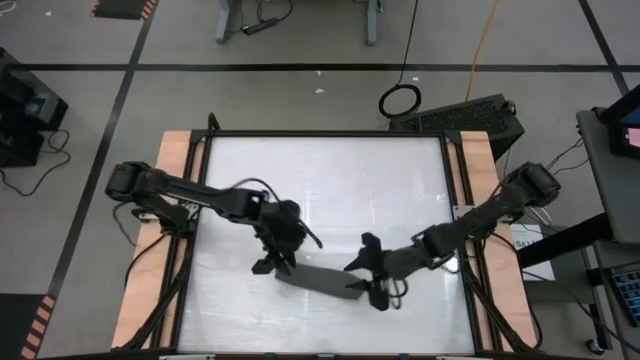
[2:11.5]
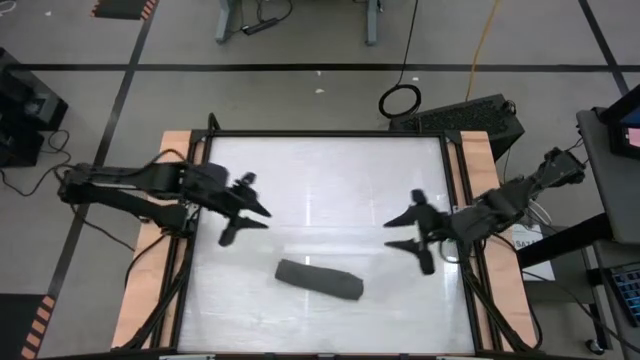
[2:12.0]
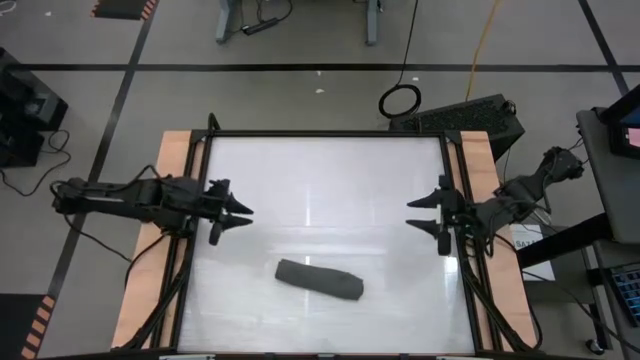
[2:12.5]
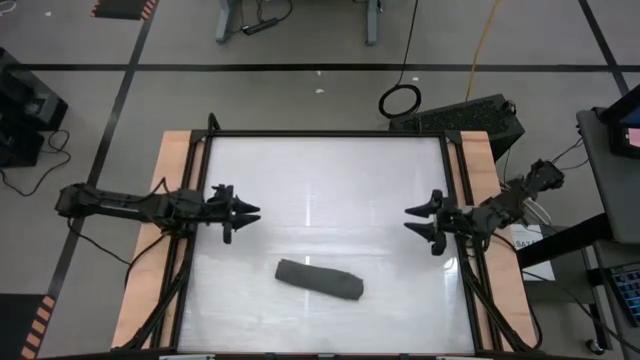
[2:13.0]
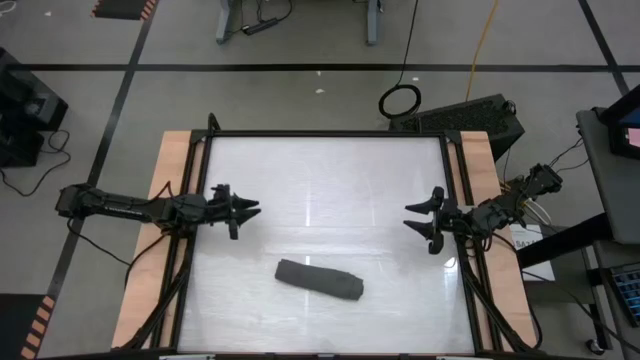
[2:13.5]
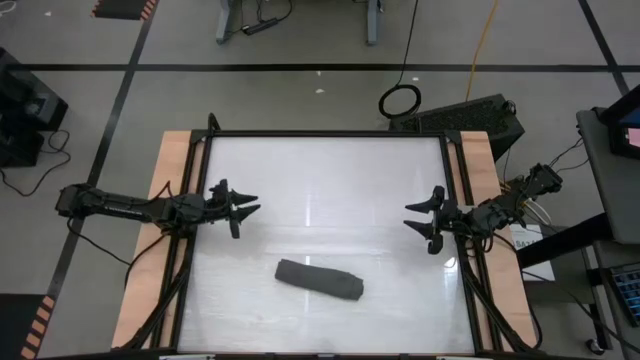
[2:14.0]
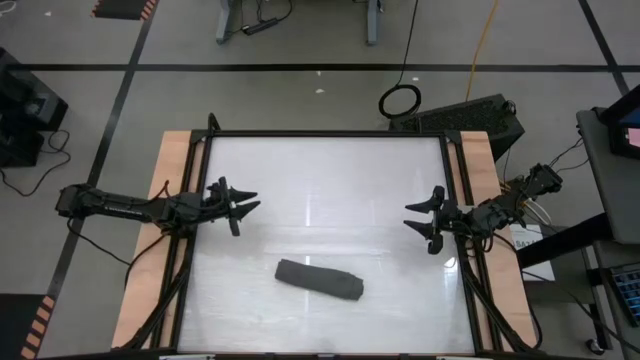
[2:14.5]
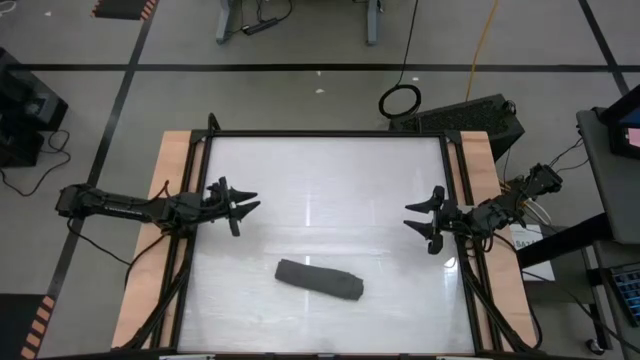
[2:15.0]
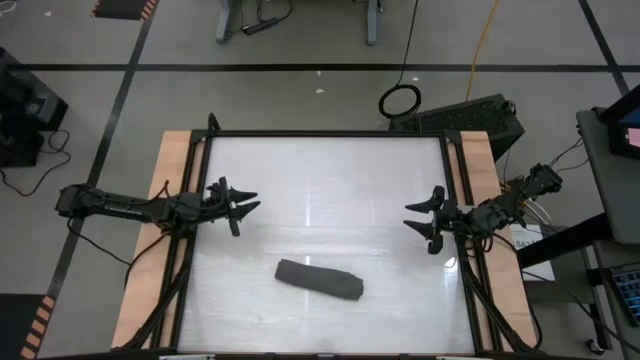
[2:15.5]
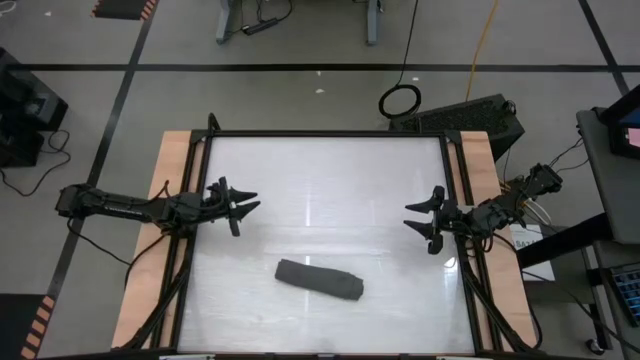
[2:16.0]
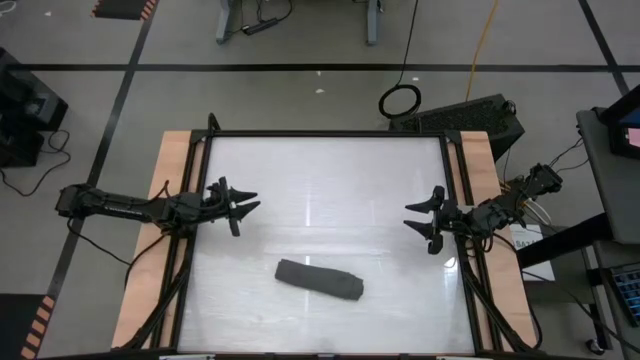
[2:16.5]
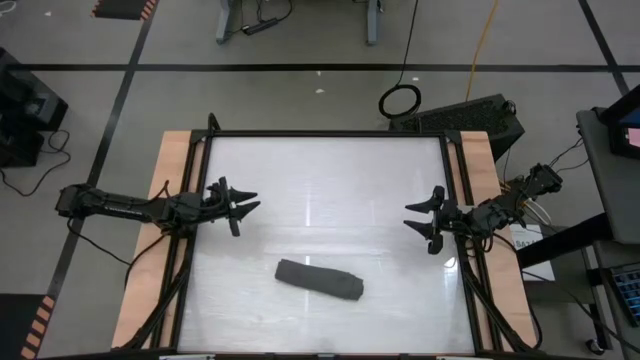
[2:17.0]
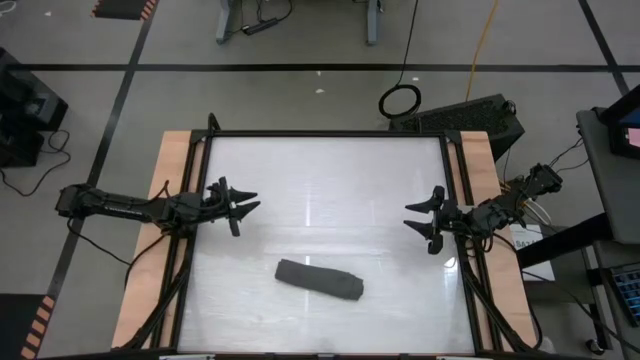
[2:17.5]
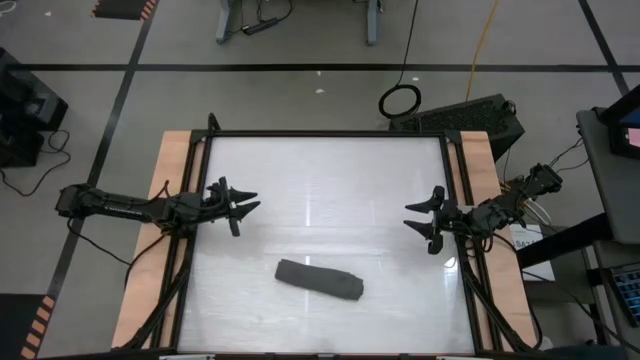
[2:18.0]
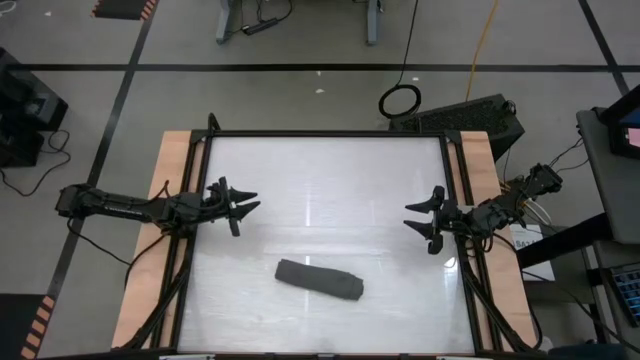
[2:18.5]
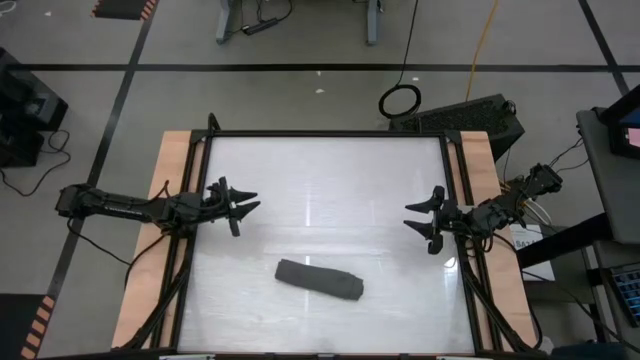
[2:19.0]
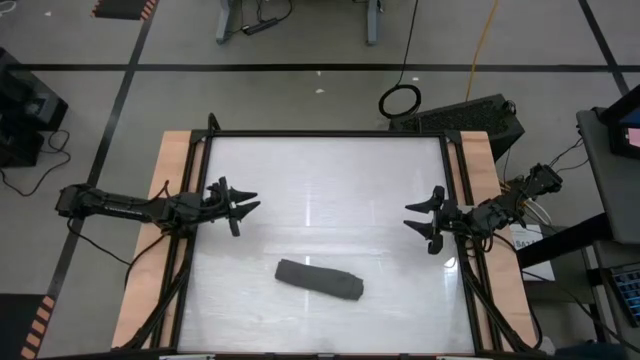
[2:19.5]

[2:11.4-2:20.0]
Task: Roll towel
Return to Home Position

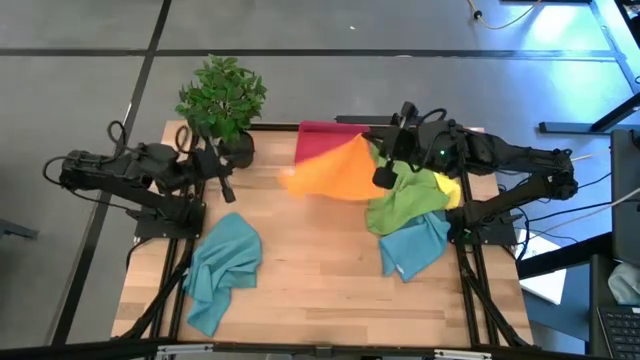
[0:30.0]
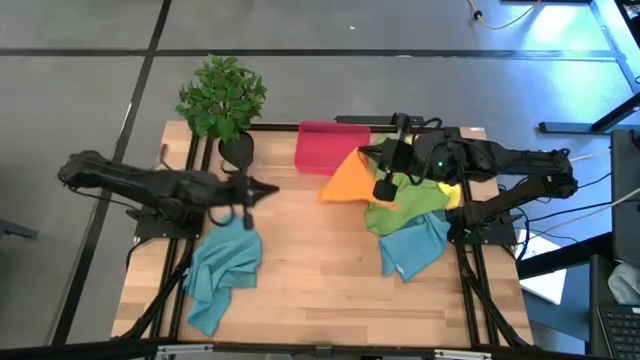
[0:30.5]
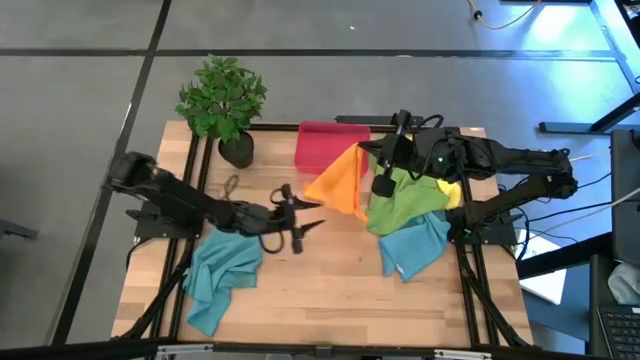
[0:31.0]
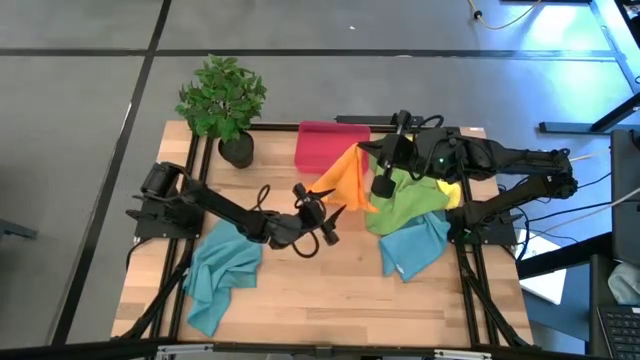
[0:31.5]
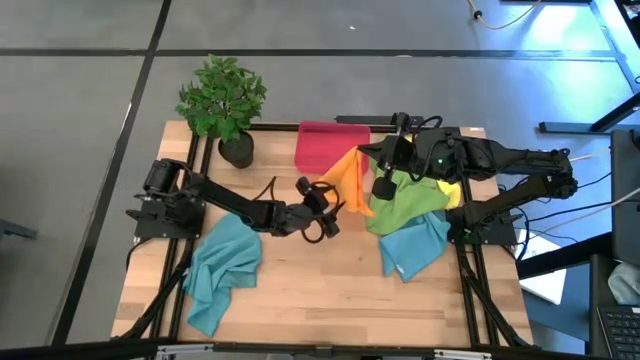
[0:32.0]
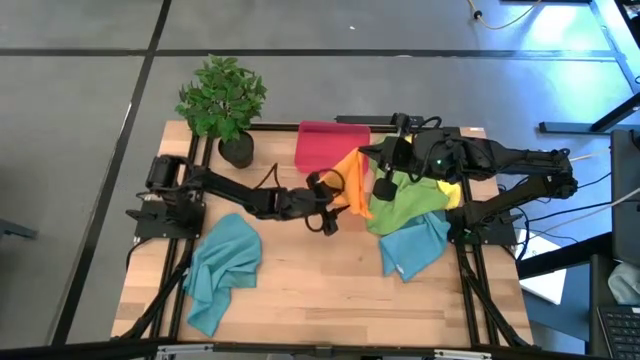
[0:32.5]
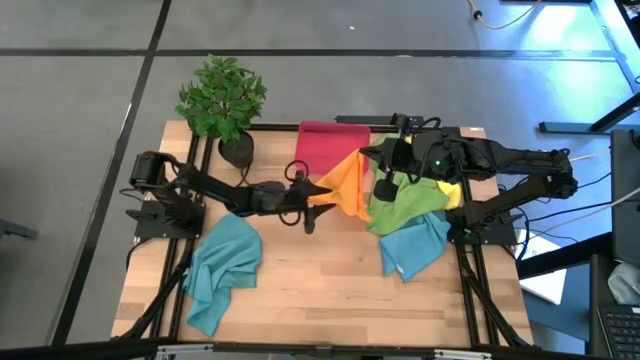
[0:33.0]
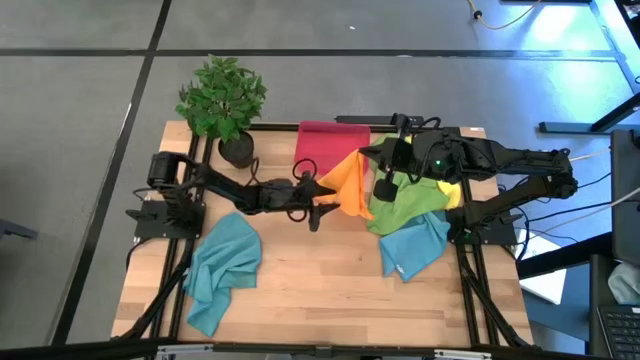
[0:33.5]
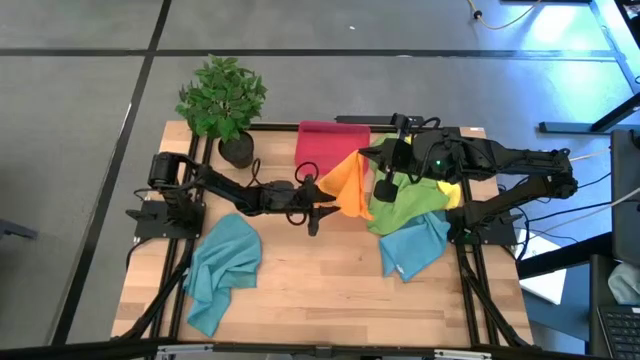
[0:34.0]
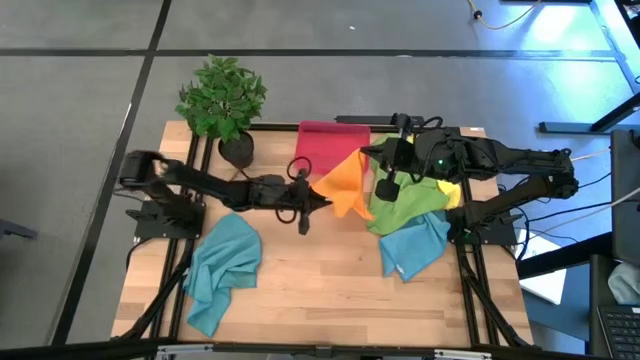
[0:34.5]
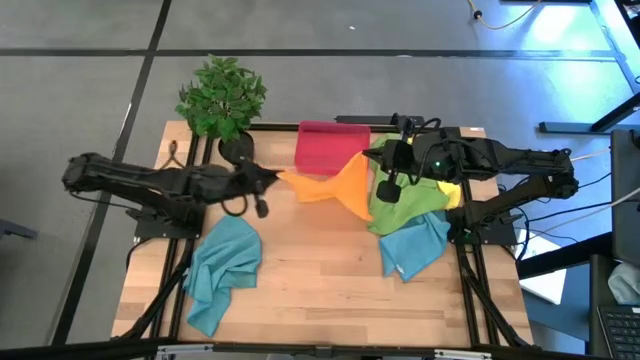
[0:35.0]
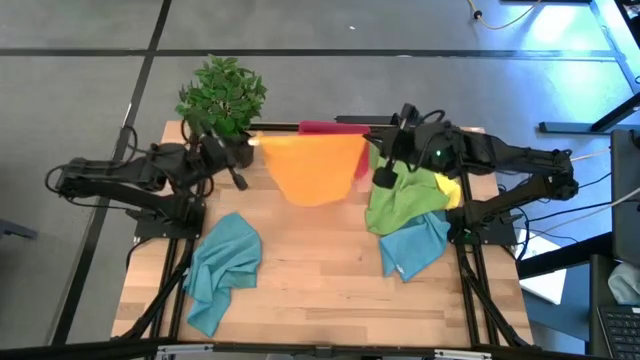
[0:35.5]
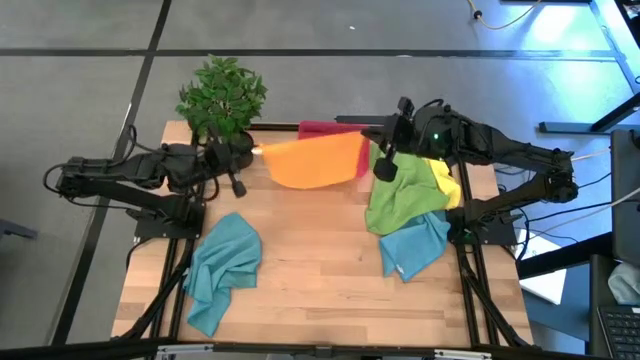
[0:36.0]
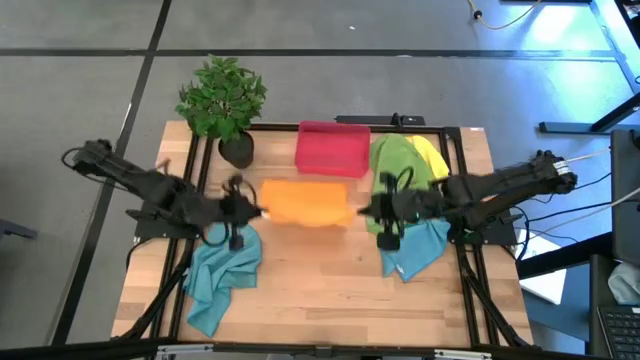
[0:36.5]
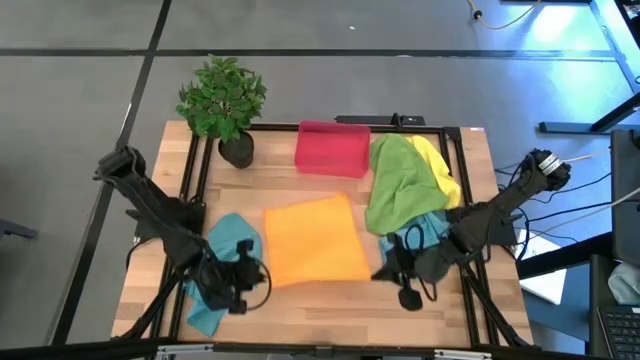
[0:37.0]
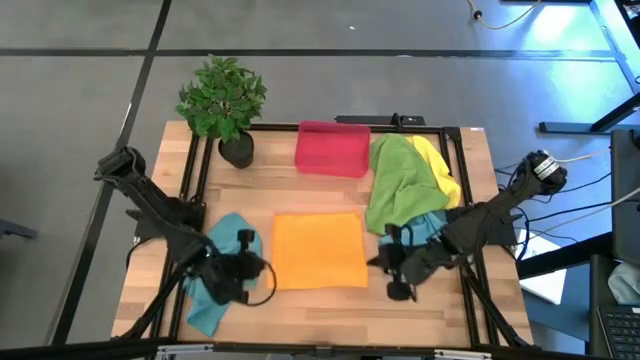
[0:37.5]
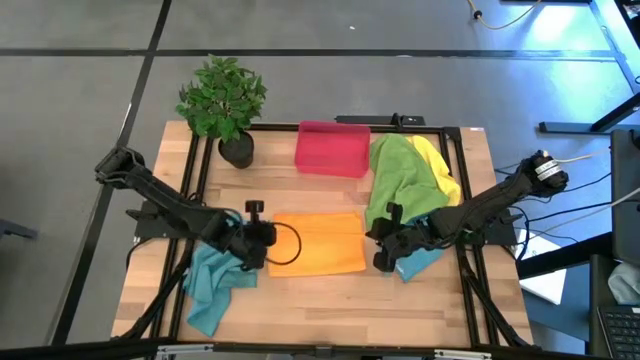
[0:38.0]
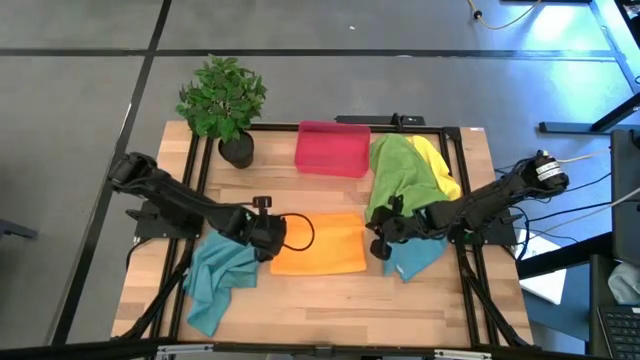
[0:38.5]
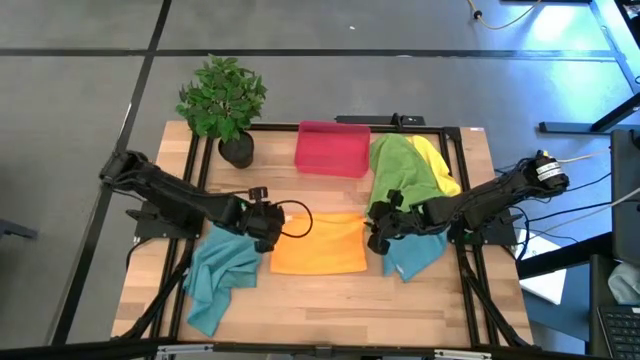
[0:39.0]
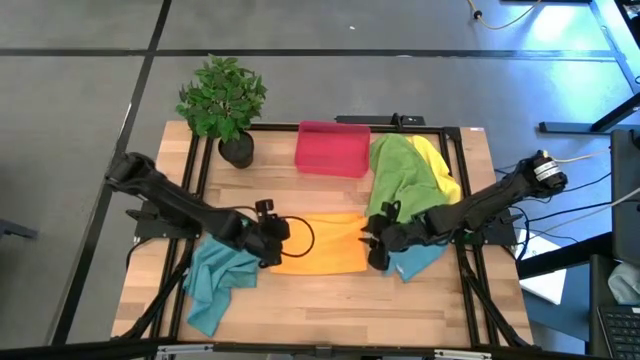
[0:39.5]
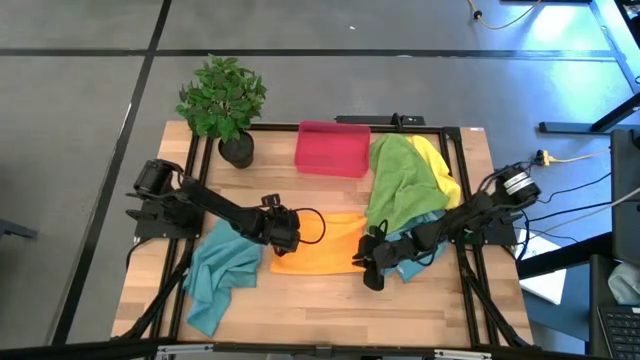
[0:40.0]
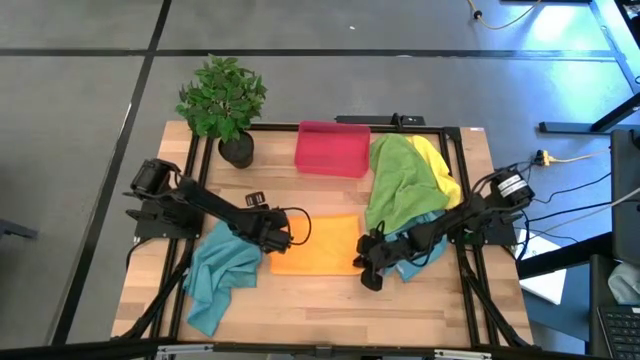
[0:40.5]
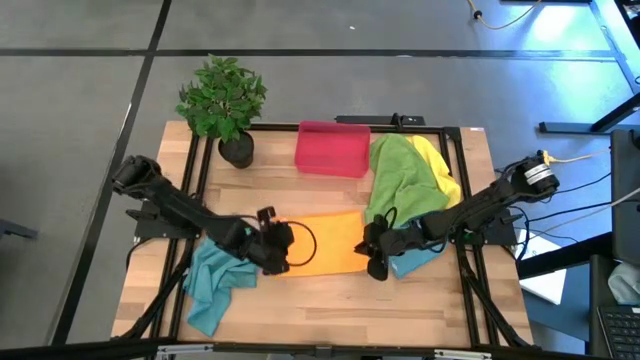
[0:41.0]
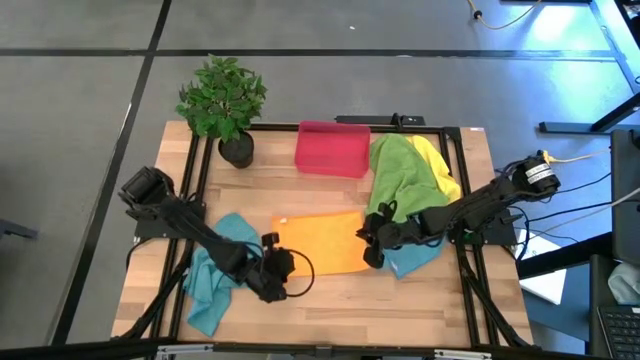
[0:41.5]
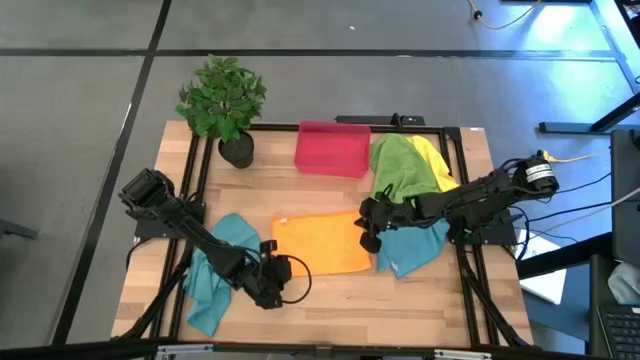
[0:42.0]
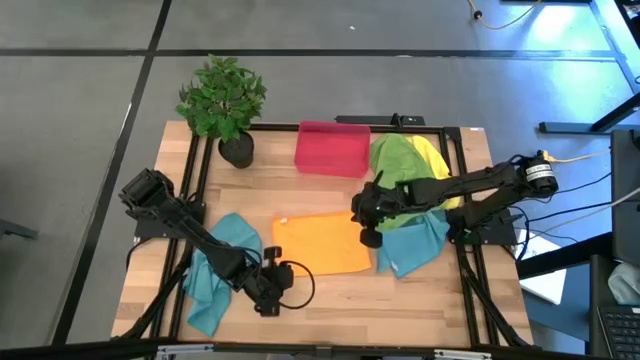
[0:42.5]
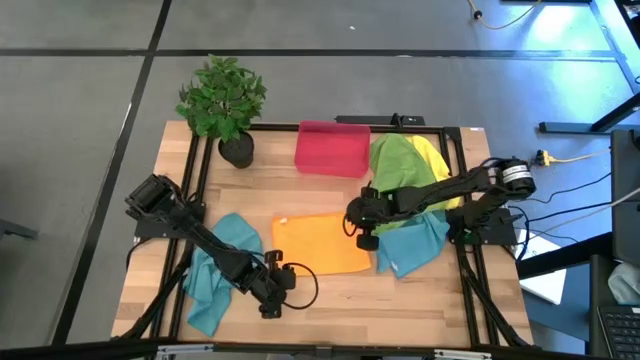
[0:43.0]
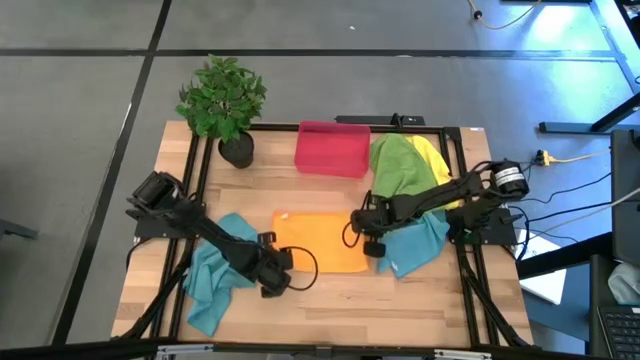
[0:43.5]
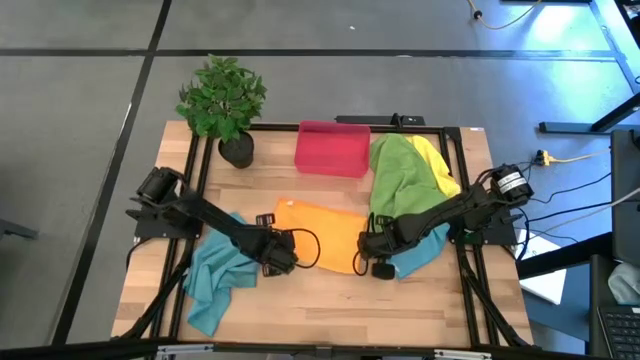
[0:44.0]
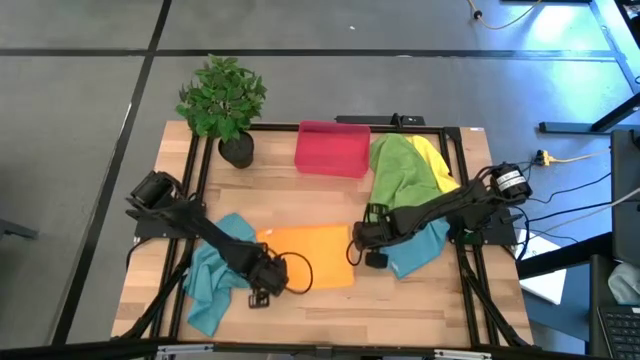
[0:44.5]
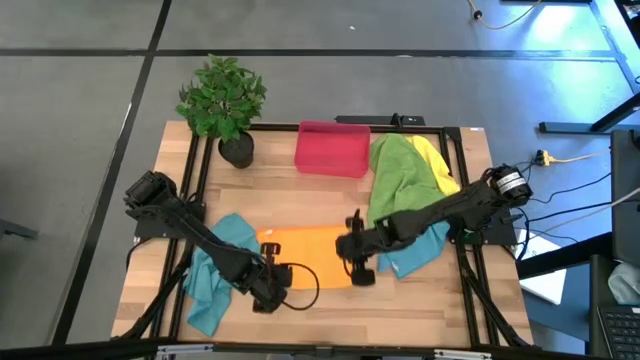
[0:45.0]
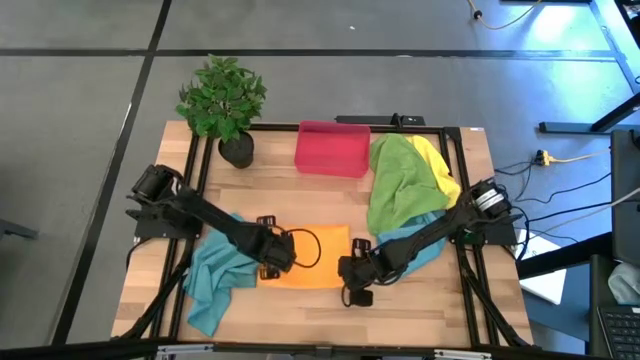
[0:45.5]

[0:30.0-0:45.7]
Task: Roll microfiber towels into tight, uniform cylinder then place into a basket
Fold the orange towel
